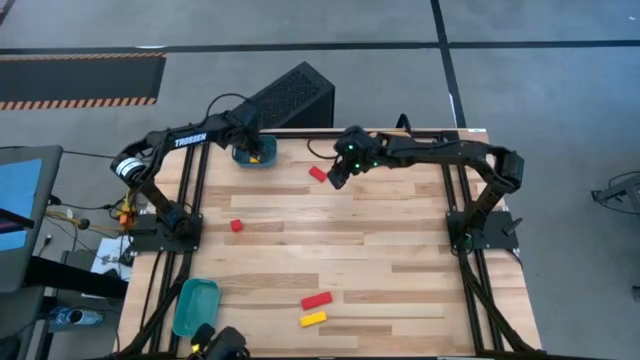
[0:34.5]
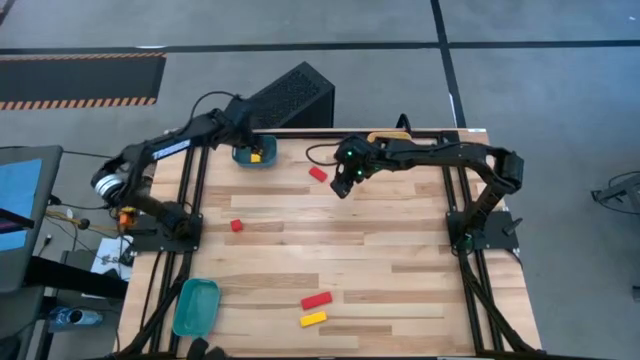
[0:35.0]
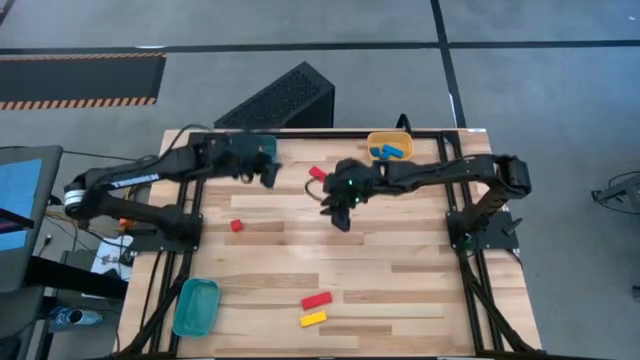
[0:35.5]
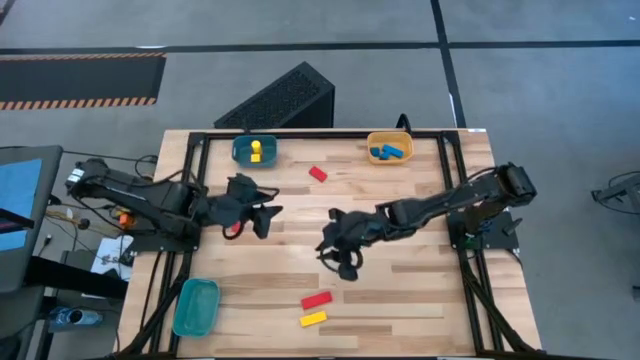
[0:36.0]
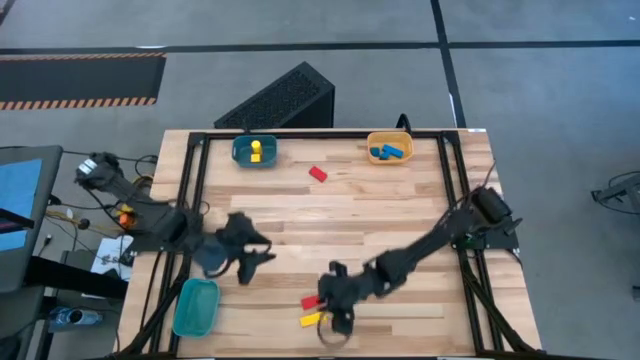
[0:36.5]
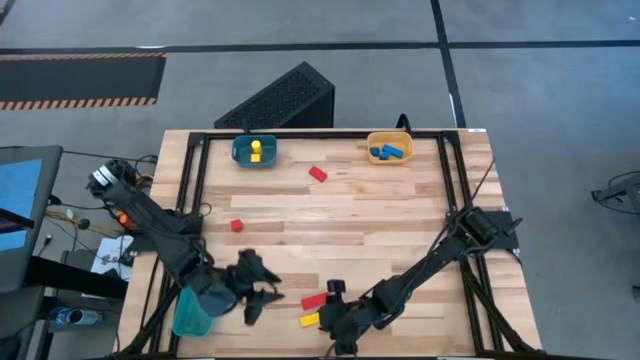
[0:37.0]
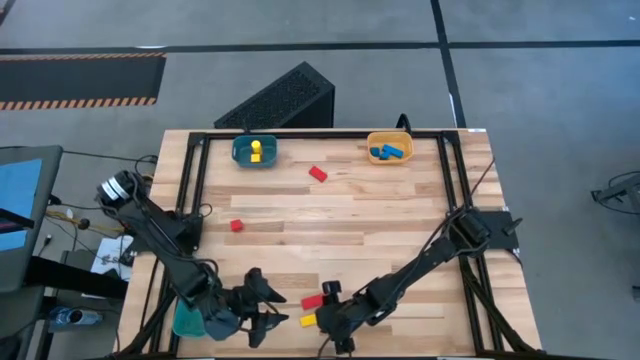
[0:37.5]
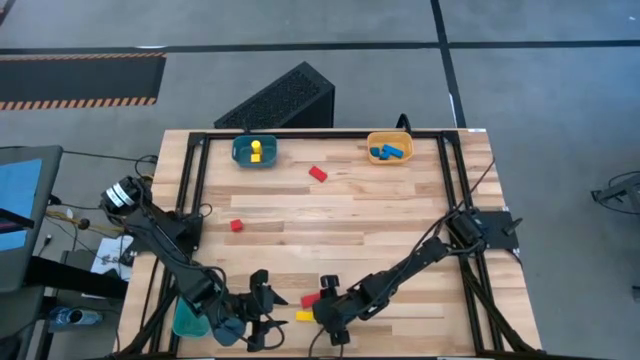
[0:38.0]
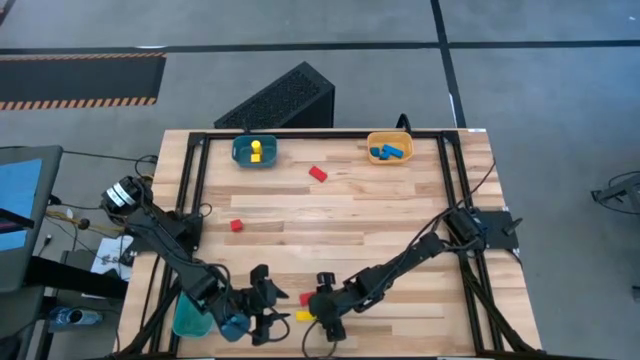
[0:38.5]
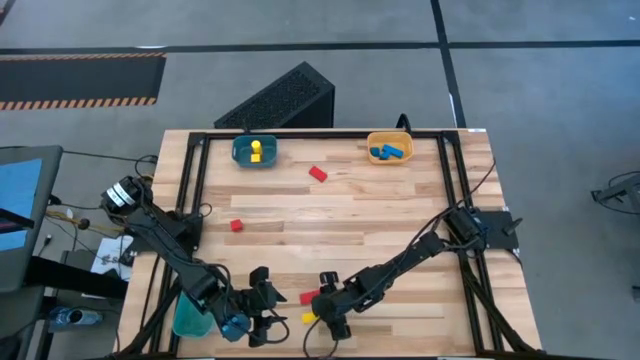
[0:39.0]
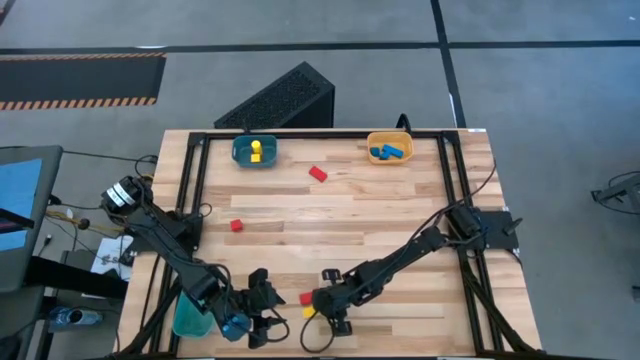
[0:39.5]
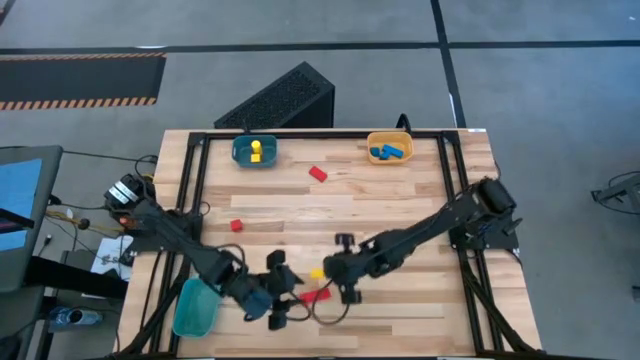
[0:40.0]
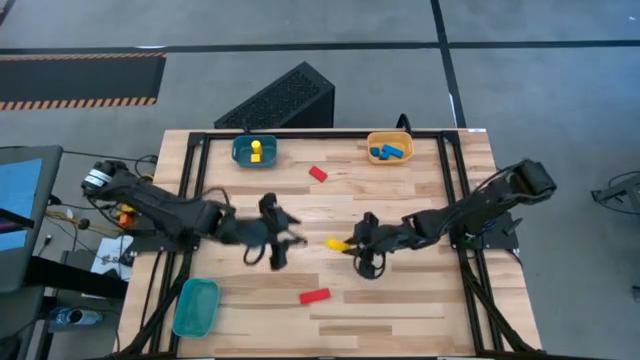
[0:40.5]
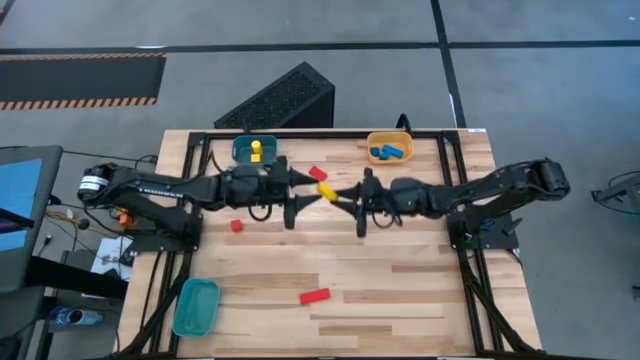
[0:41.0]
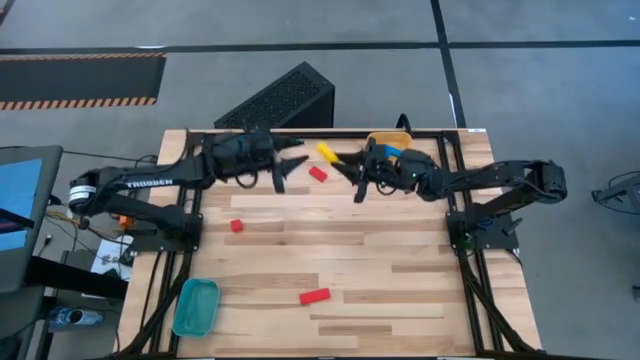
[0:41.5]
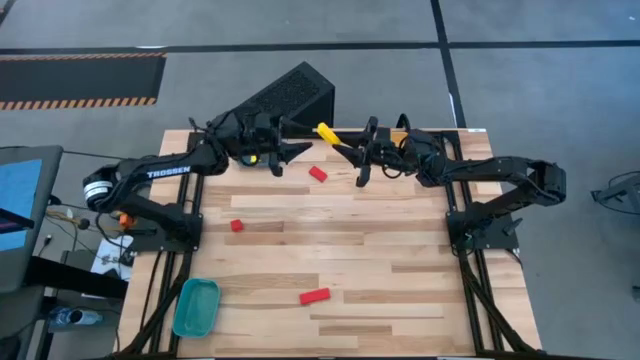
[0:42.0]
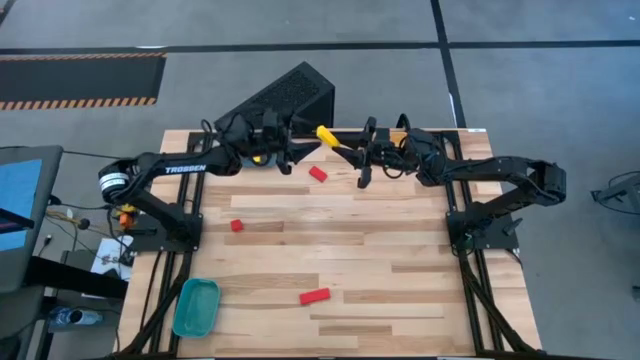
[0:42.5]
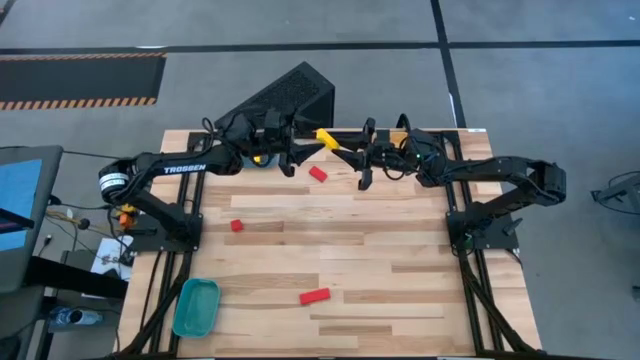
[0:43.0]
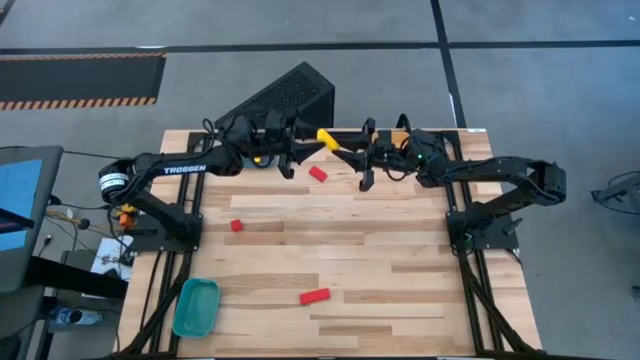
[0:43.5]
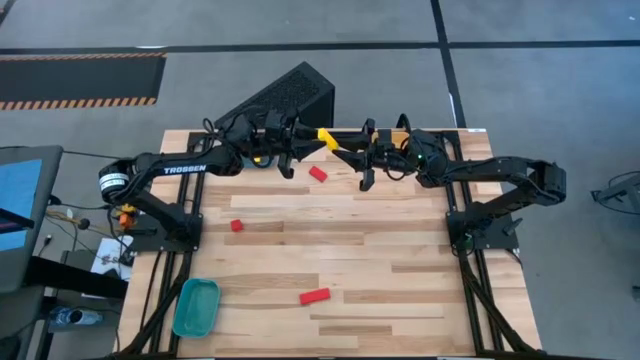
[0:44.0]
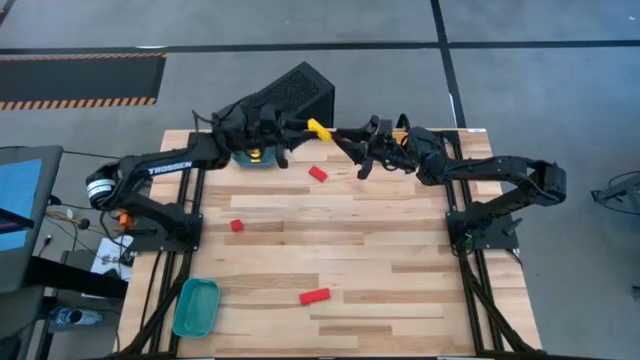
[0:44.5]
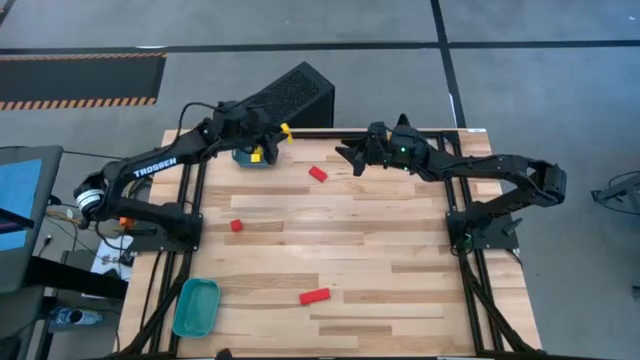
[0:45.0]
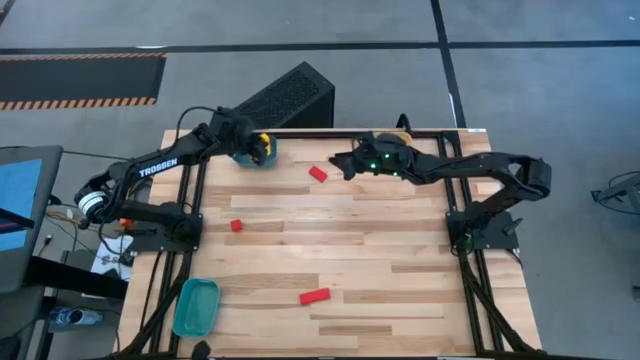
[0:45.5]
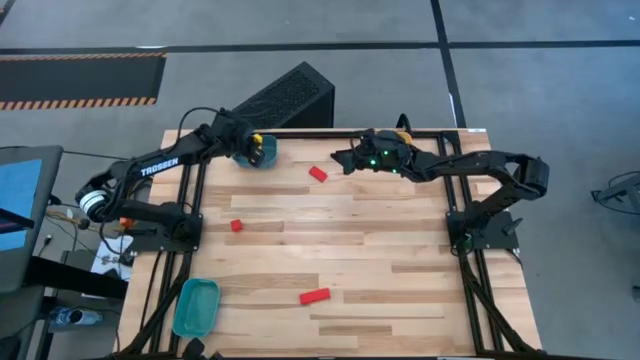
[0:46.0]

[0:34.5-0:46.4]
Task: Sort & place blocks by color
Put the yellow block into the green bin

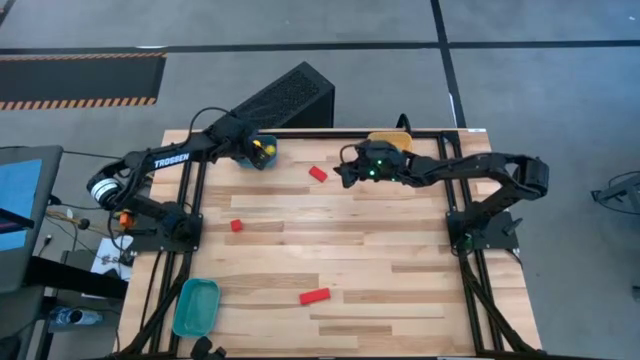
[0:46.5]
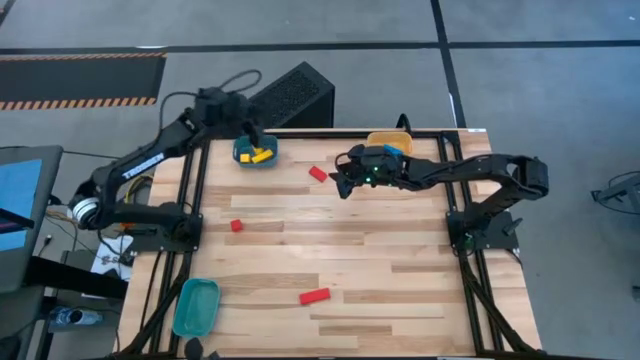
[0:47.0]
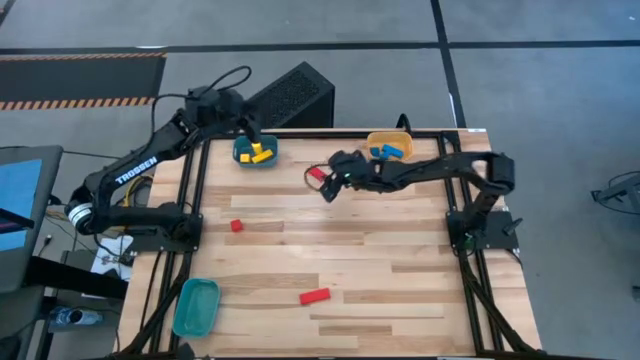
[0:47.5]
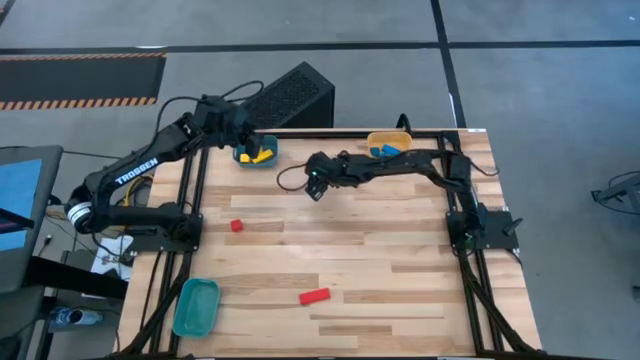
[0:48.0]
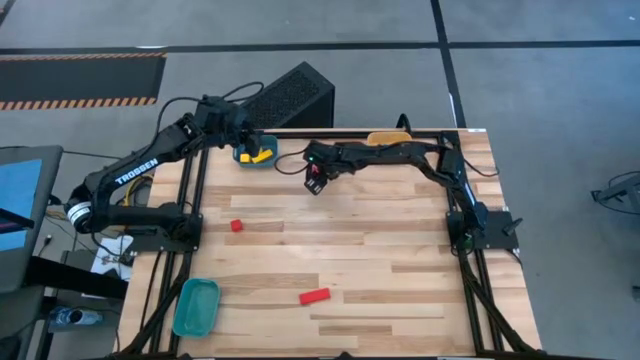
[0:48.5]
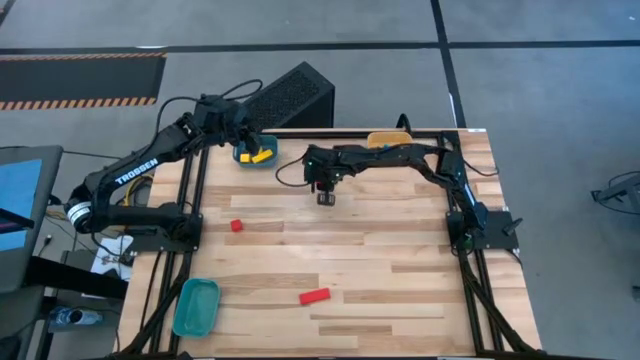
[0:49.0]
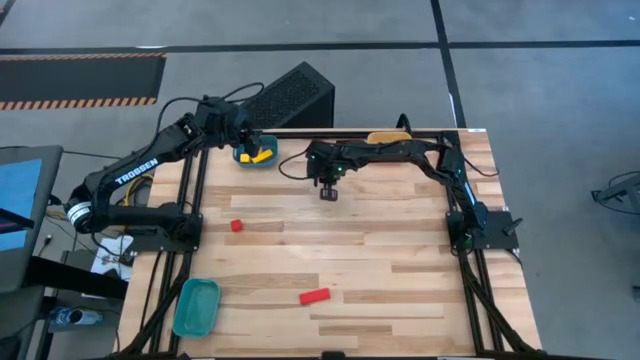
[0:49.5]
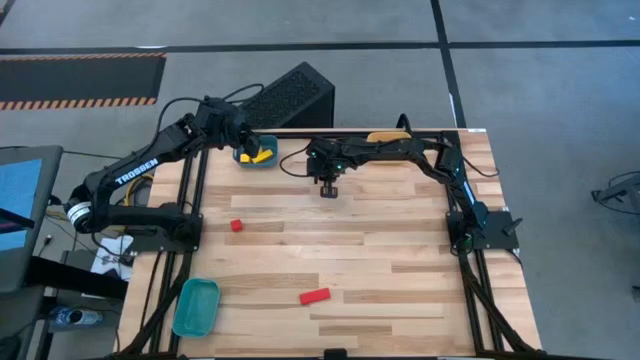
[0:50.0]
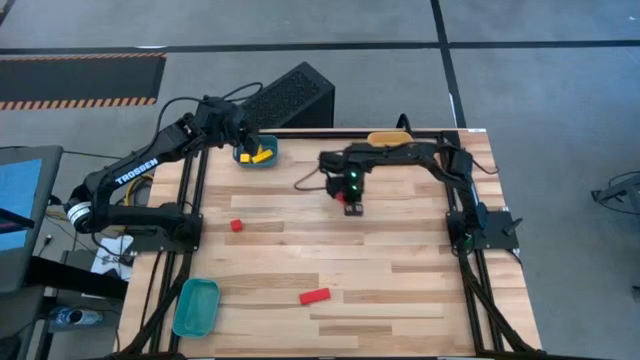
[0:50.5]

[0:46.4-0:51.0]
Put the top red block into the blue bin

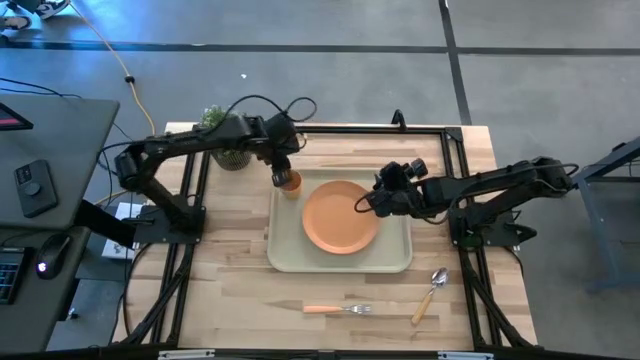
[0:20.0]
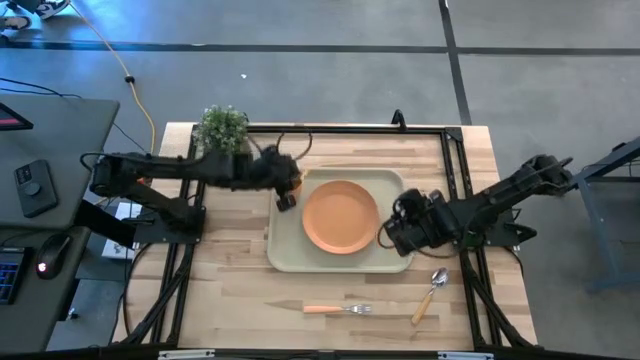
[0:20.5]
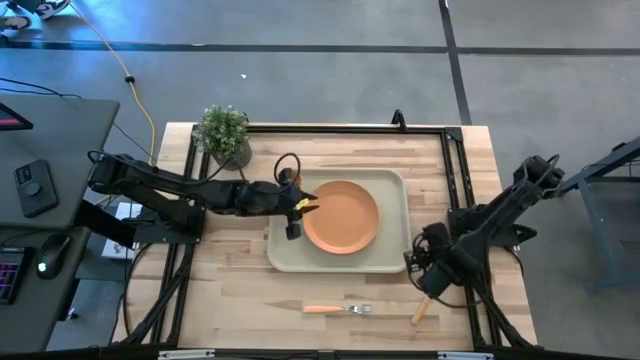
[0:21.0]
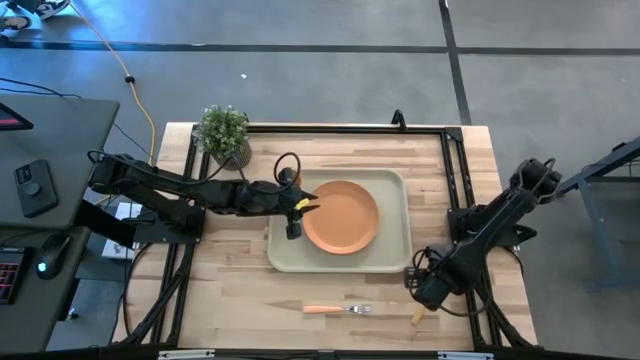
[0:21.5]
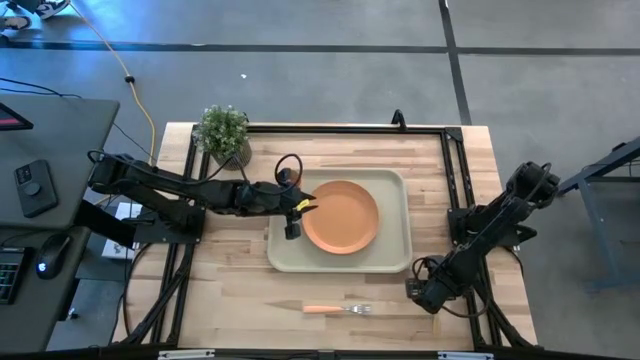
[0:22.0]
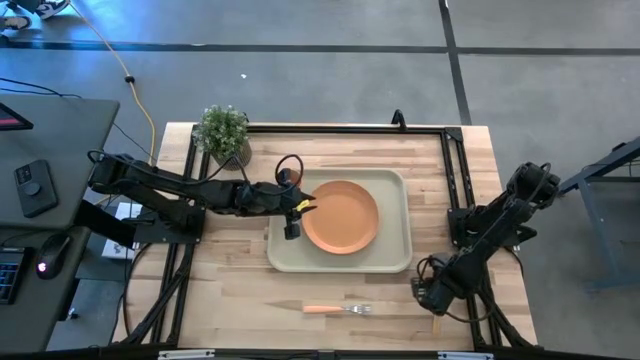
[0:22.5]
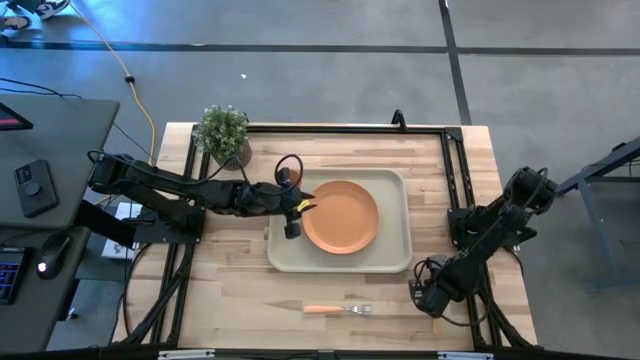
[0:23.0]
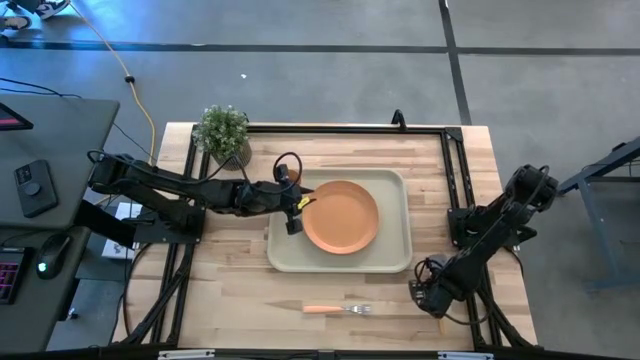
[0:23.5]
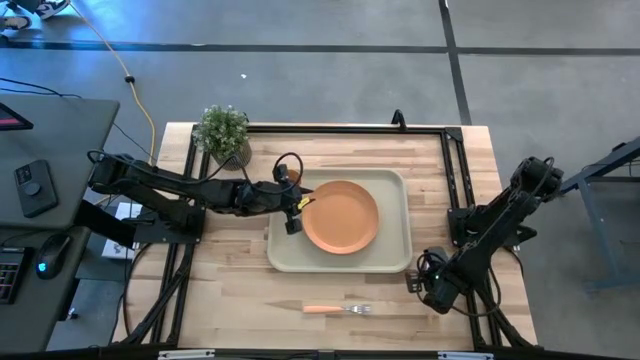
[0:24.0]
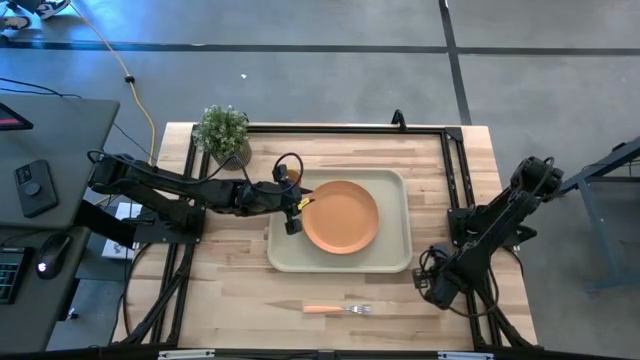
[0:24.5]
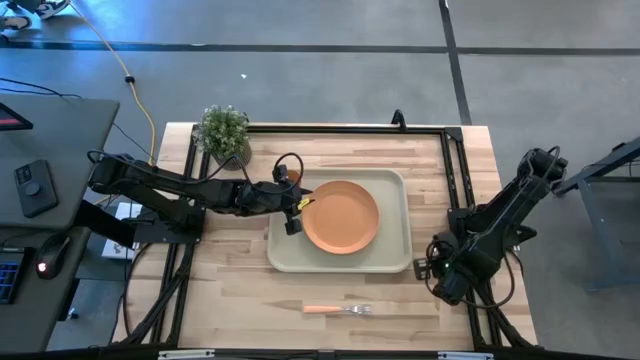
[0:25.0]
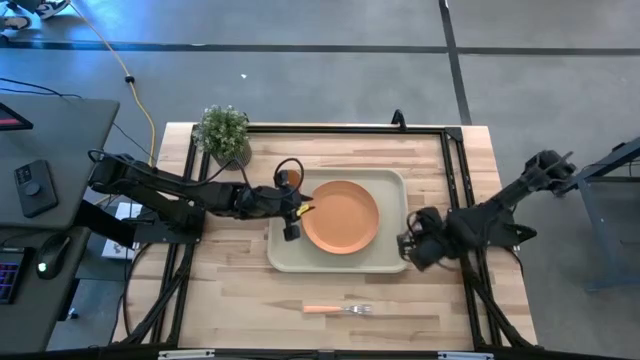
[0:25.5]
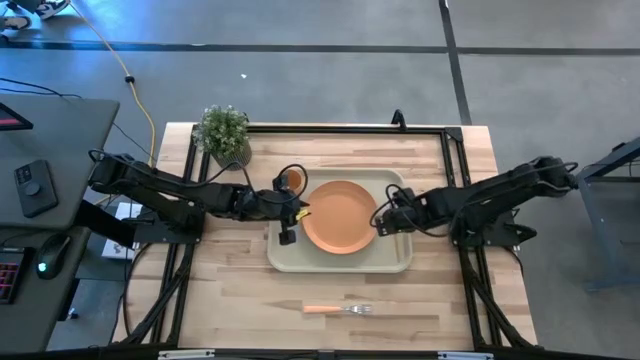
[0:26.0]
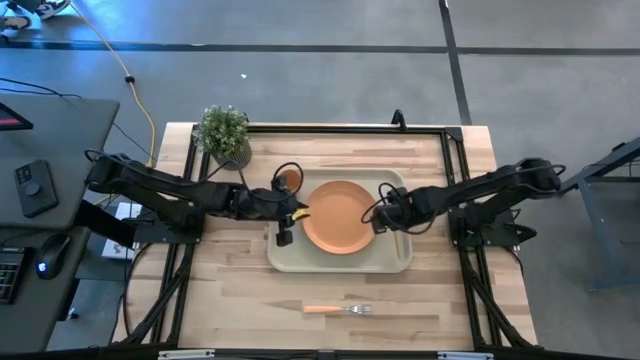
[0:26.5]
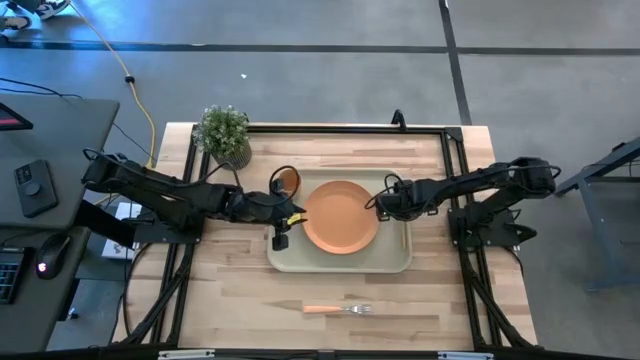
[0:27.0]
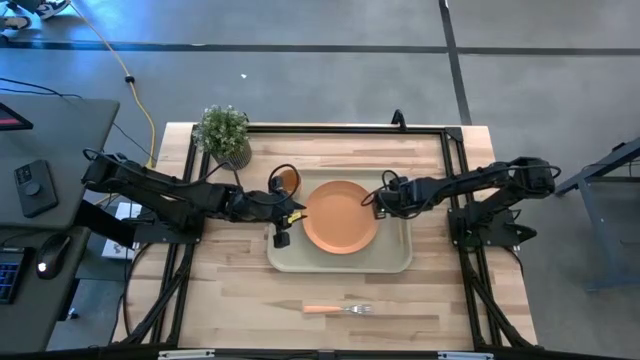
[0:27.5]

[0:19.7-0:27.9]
Task: Pick and place plate/cup/fork/spoon on tray
Put the orange spoon on the light brown tray to the right of the orange plate
